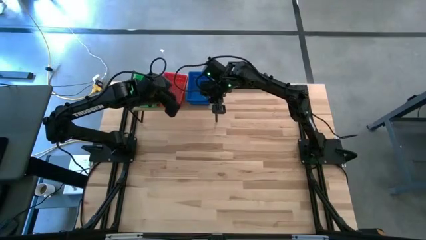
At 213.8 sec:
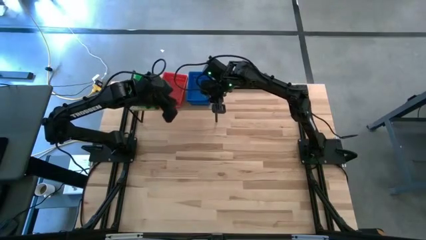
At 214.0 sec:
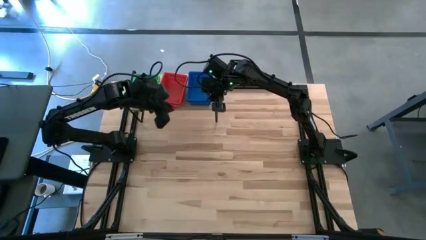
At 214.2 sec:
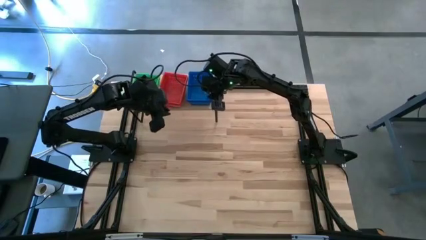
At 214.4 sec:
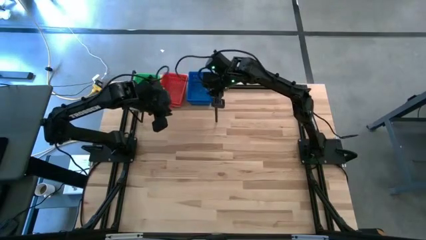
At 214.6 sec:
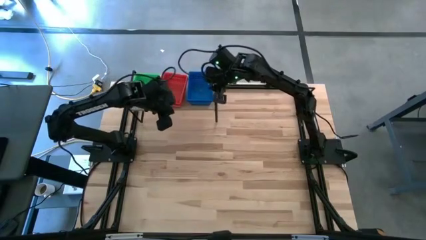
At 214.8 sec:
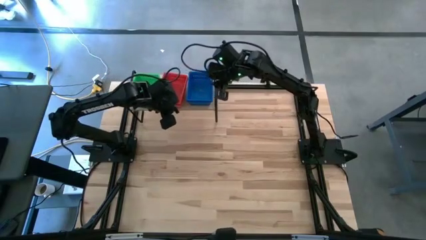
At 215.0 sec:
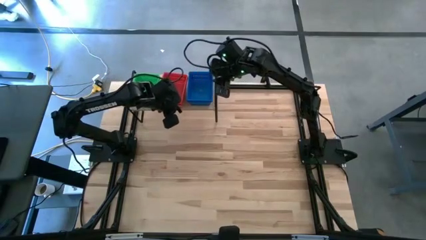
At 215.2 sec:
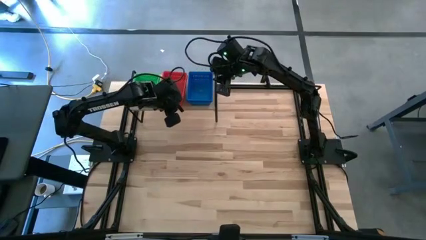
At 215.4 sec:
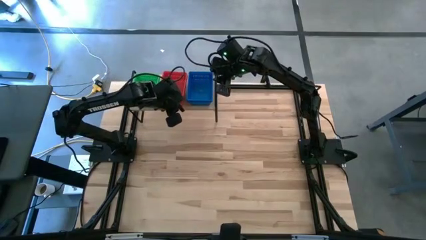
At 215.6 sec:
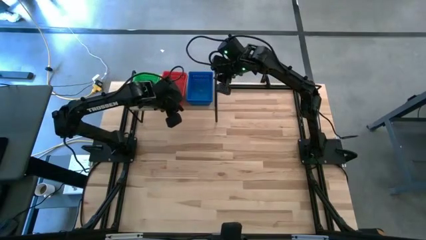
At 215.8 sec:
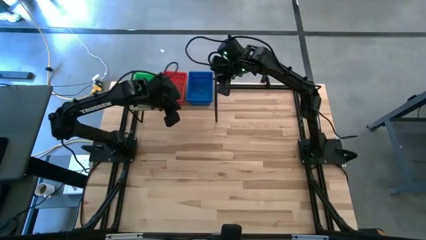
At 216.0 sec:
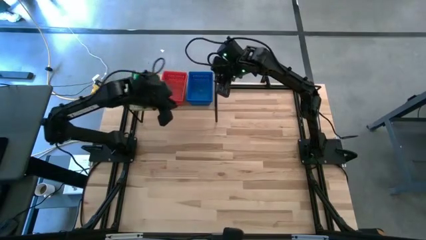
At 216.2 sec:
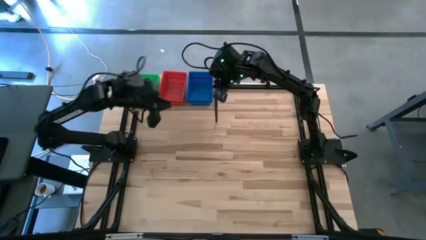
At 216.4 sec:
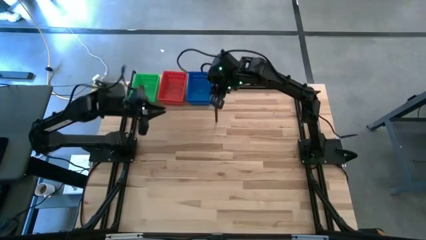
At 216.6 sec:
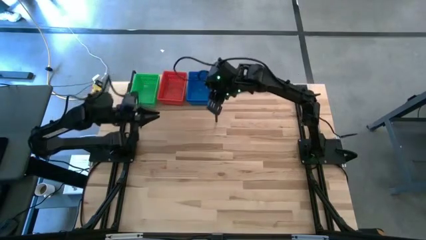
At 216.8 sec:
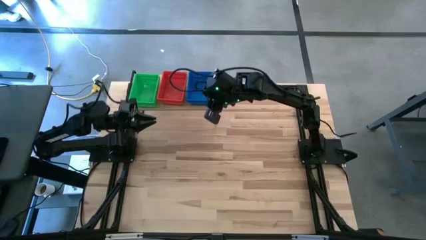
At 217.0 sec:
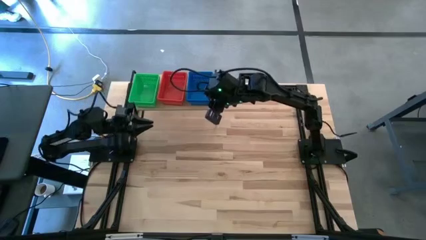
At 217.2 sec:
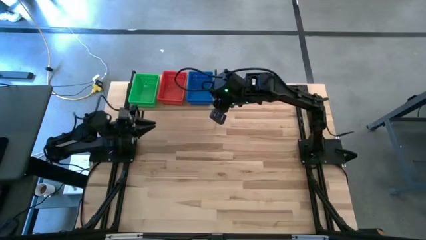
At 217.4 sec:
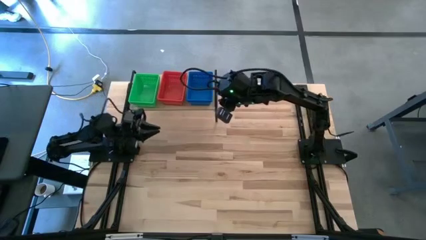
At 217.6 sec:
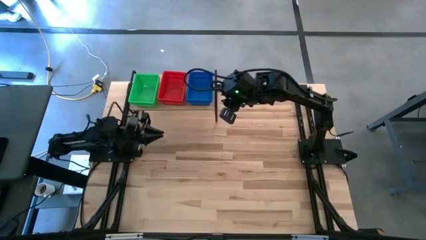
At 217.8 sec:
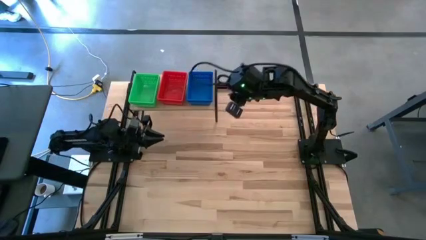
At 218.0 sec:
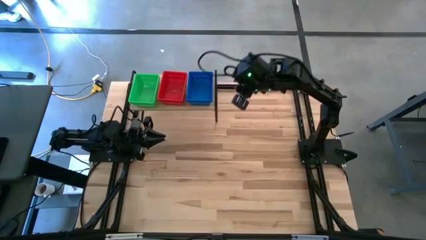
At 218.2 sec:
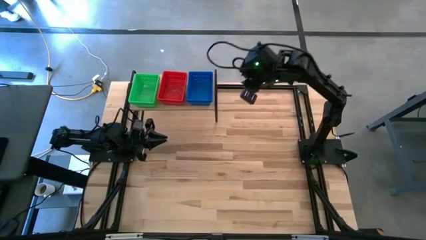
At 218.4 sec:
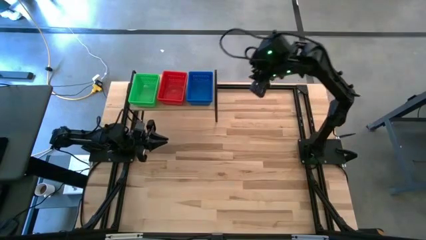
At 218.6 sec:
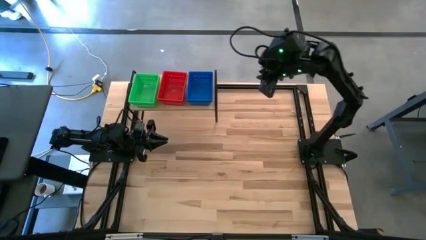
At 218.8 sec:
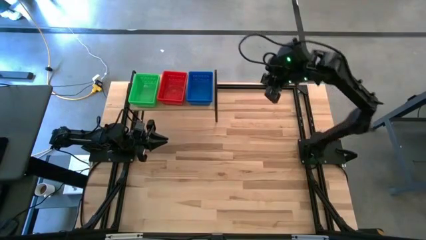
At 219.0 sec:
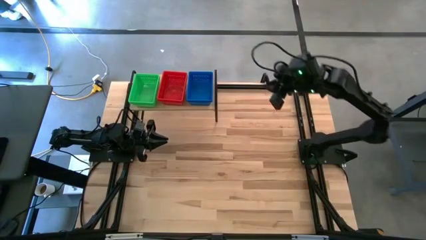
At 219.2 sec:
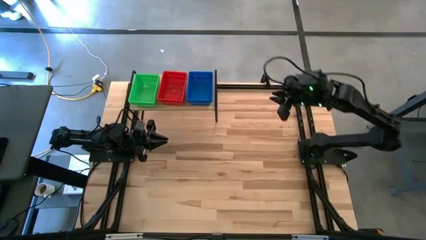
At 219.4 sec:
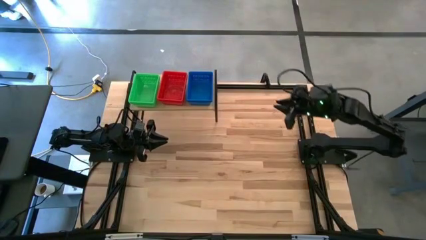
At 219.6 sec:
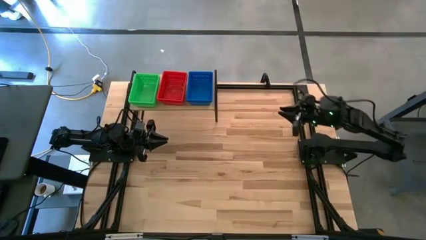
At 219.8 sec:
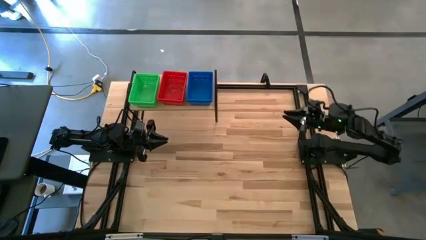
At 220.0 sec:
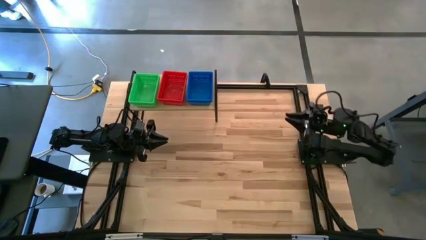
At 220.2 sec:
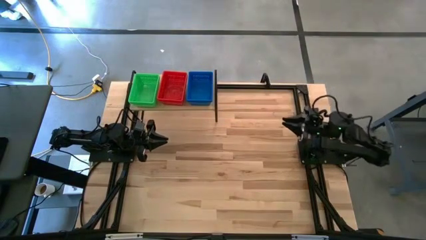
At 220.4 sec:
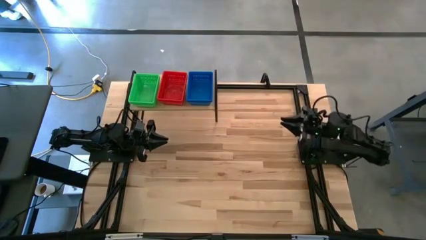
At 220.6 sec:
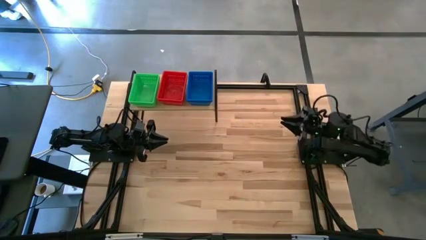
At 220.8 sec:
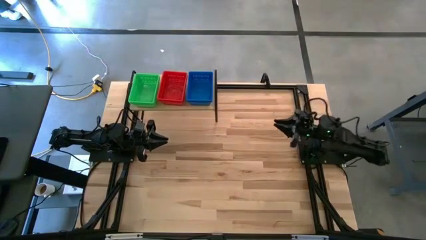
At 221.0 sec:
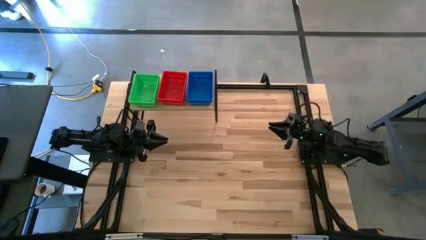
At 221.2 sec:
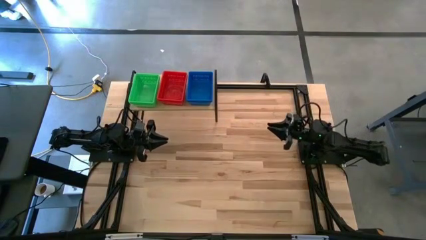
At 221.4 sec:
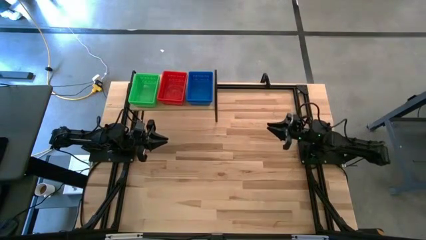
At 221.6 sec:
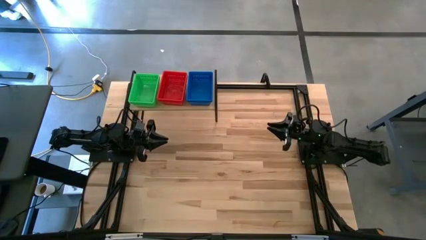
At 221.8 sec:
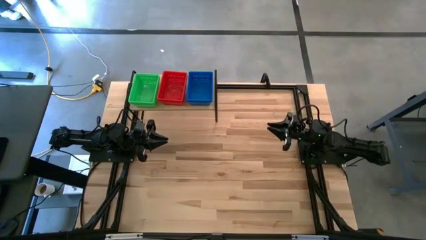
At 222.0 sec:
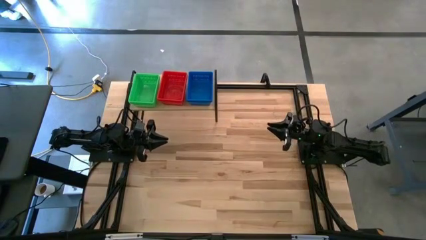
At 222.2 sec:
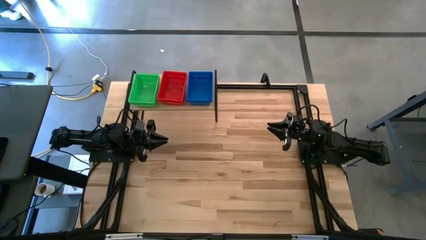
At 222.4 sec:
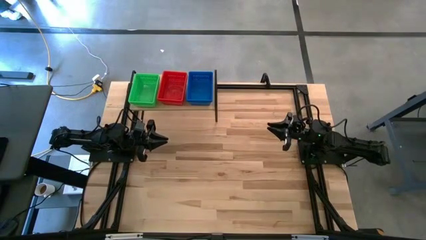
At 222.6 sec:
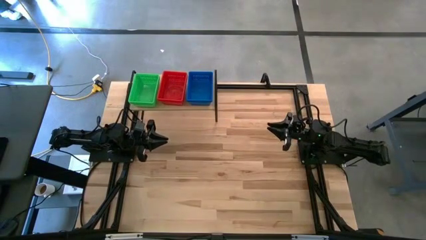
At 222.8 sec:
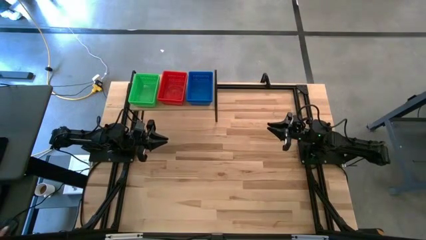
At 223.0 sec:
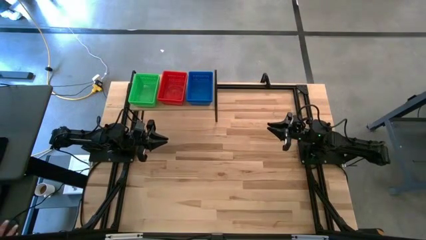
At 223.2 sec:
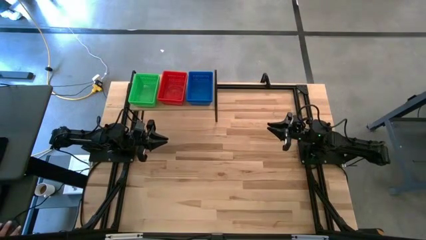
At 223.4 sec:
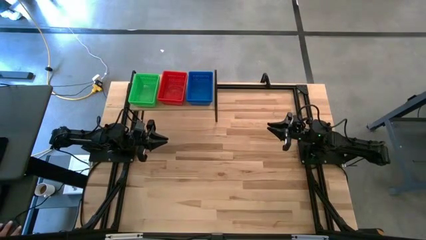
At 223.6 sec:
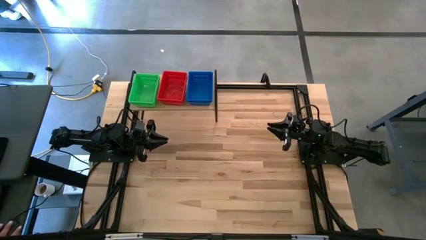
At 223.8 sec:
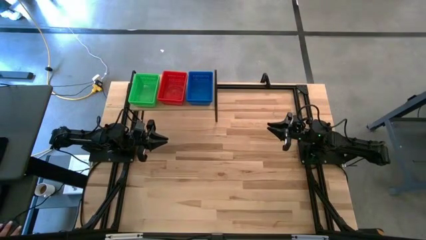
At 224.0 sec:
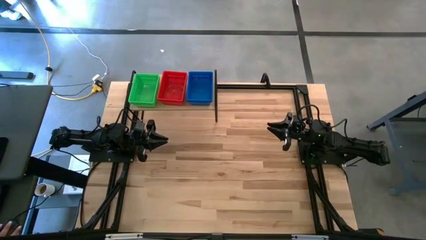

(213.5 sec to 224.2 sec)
Task: Stack baskets on shelf by color
Return to Home Position
